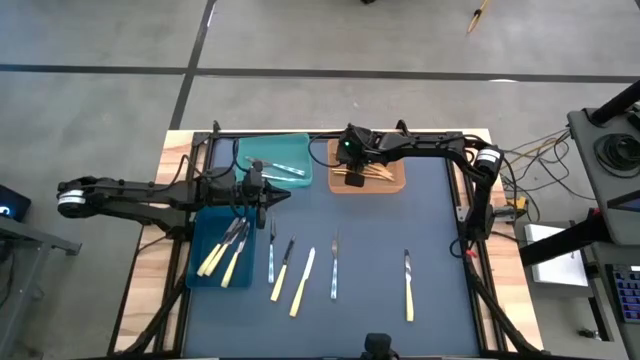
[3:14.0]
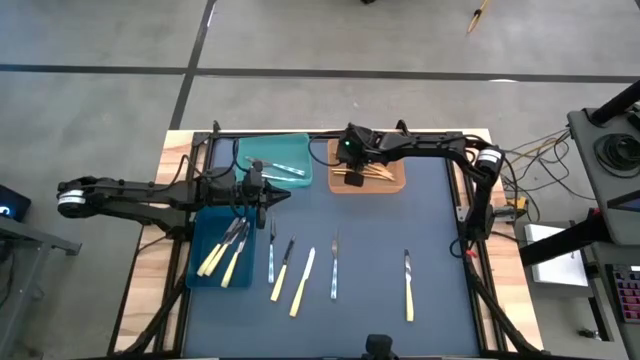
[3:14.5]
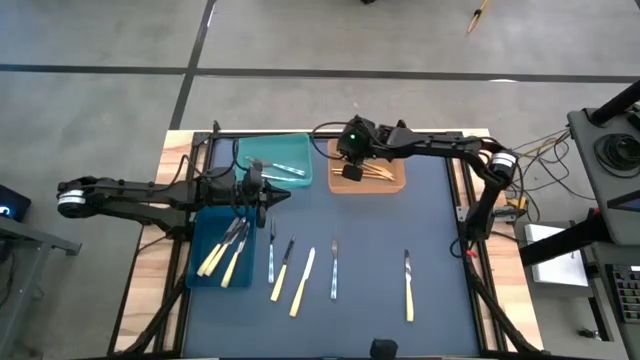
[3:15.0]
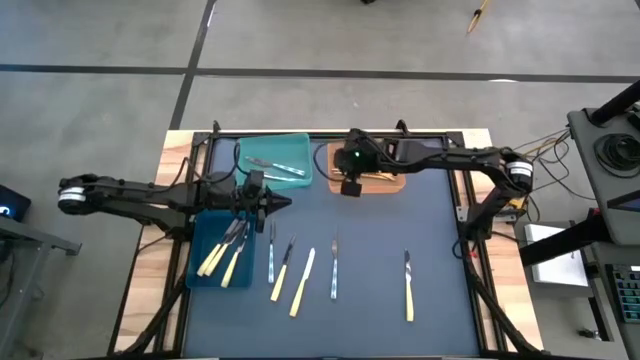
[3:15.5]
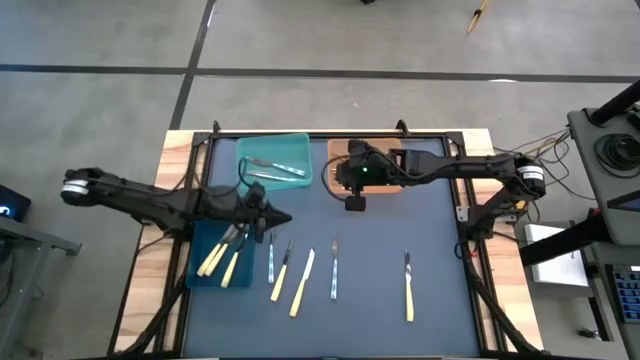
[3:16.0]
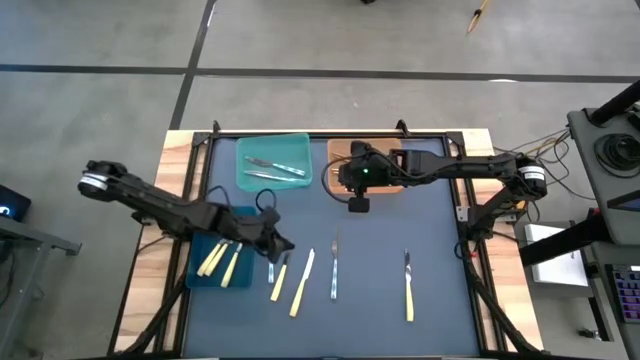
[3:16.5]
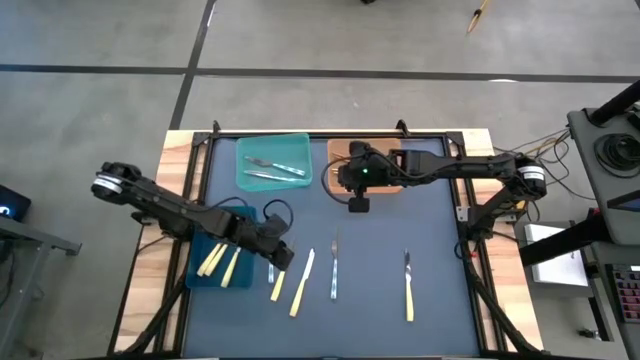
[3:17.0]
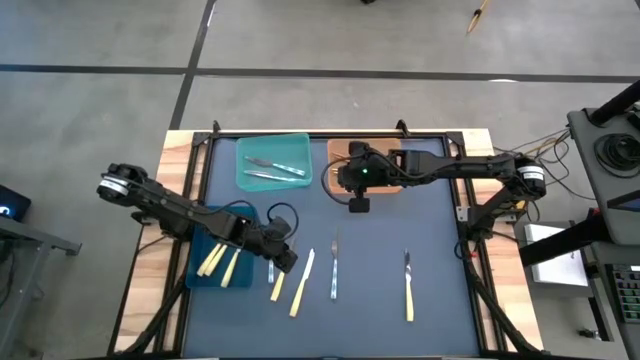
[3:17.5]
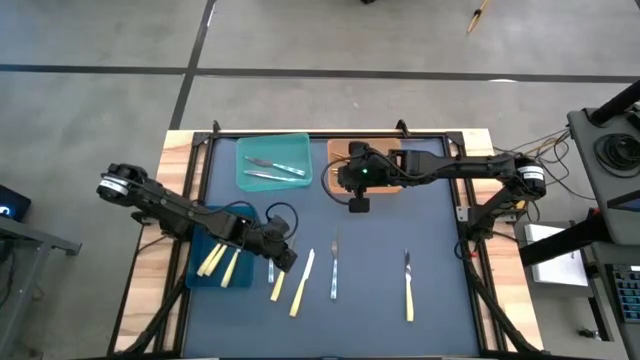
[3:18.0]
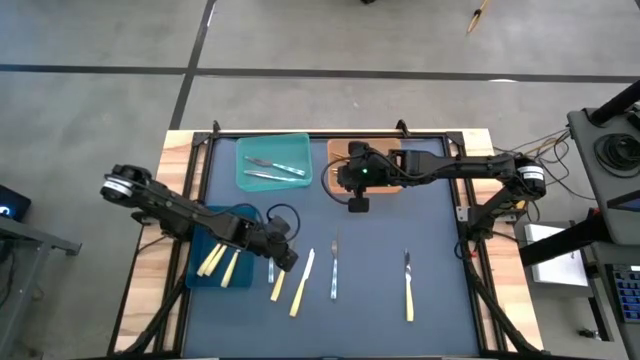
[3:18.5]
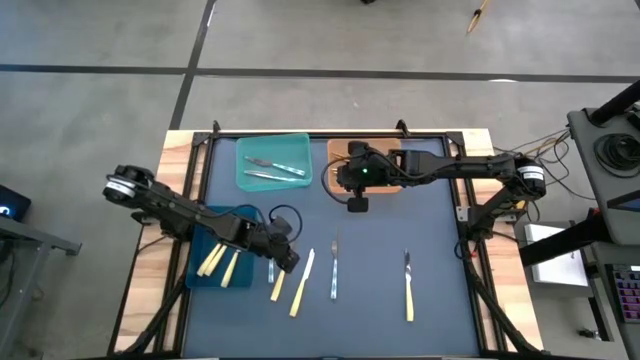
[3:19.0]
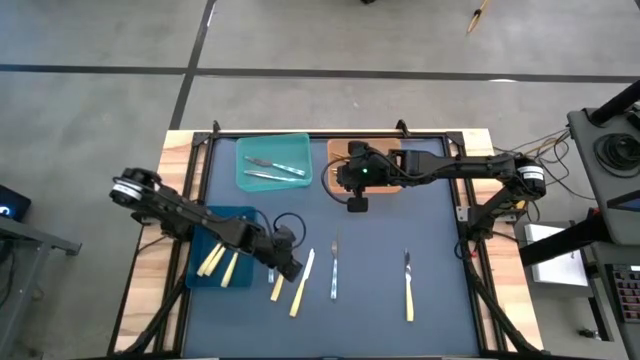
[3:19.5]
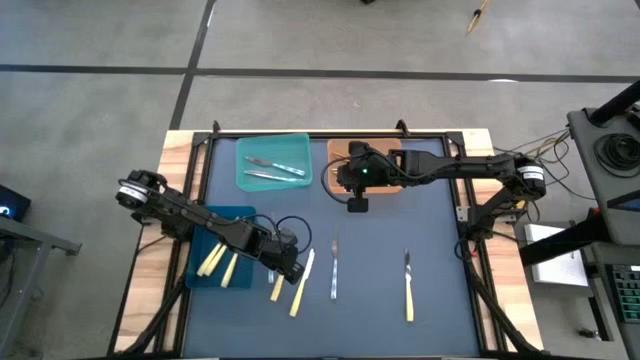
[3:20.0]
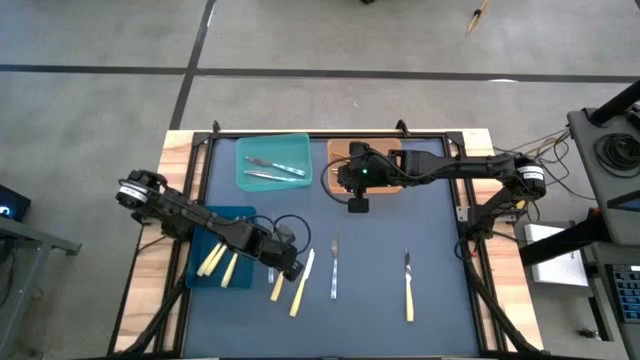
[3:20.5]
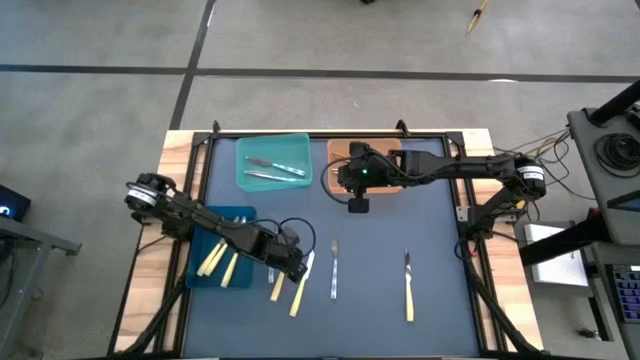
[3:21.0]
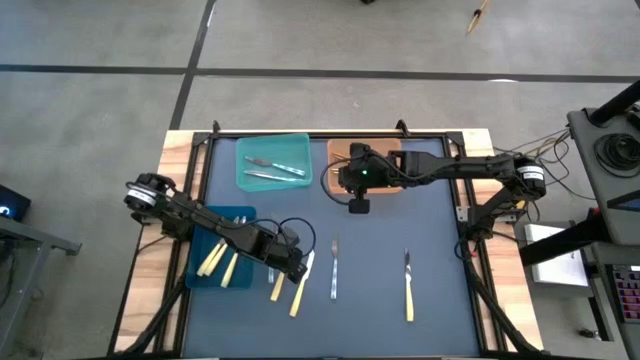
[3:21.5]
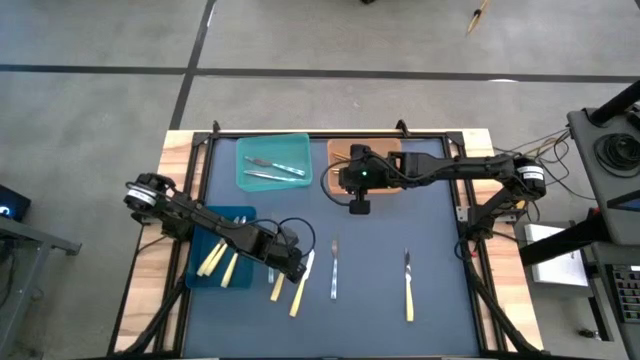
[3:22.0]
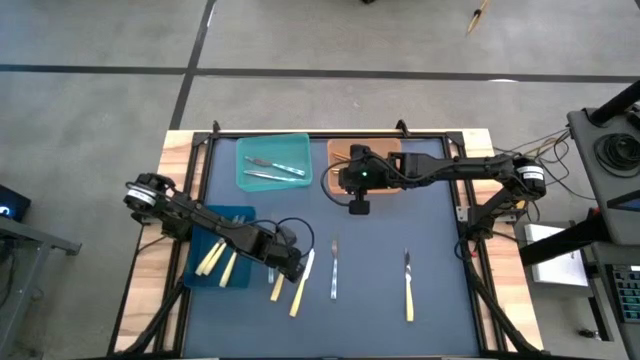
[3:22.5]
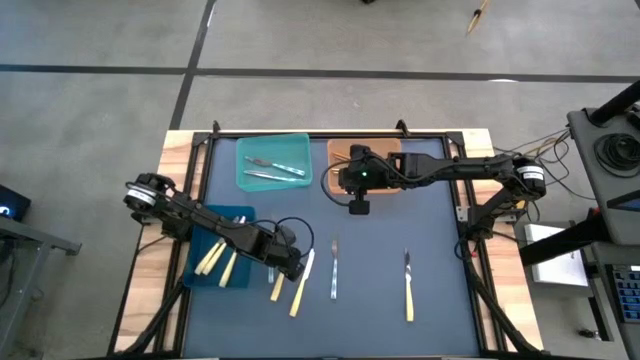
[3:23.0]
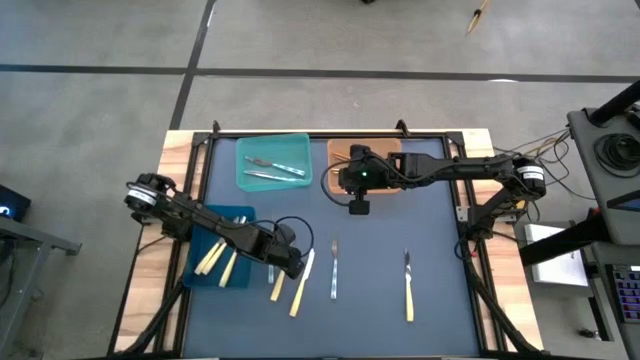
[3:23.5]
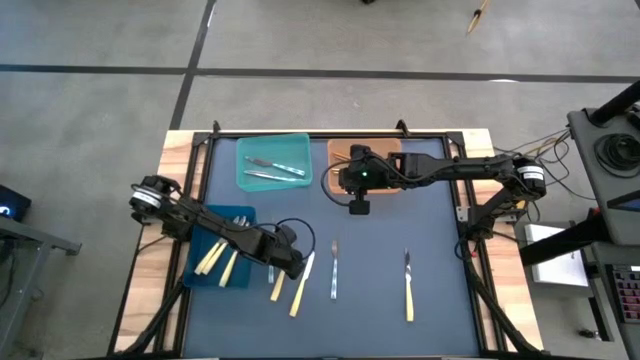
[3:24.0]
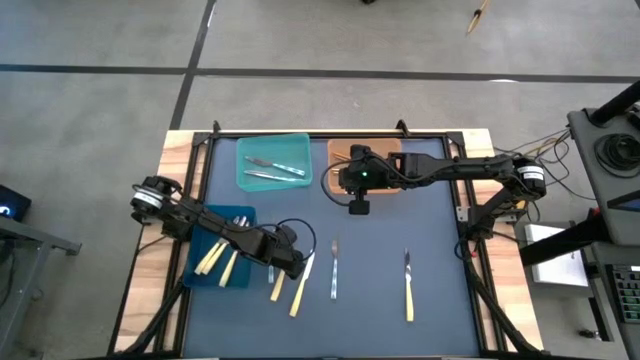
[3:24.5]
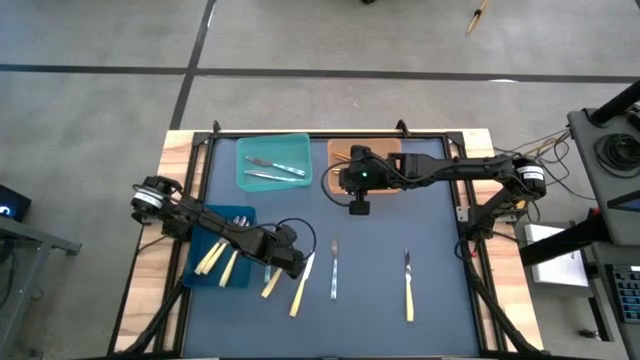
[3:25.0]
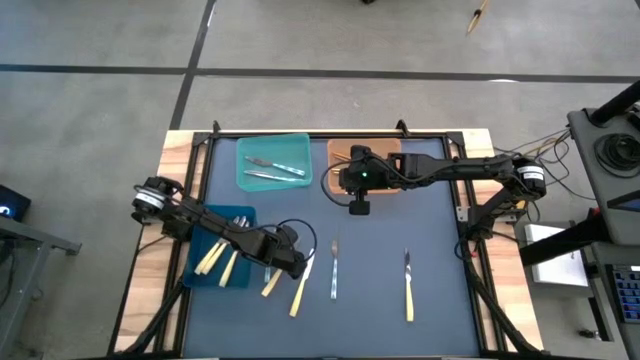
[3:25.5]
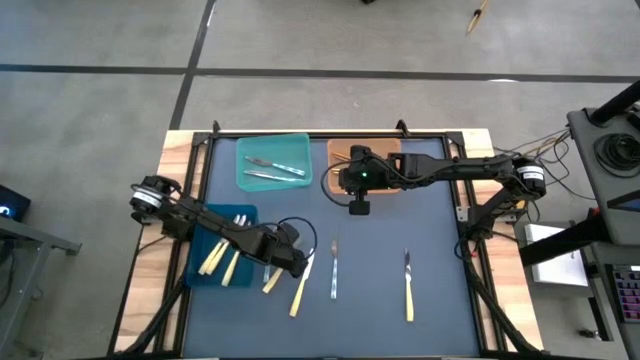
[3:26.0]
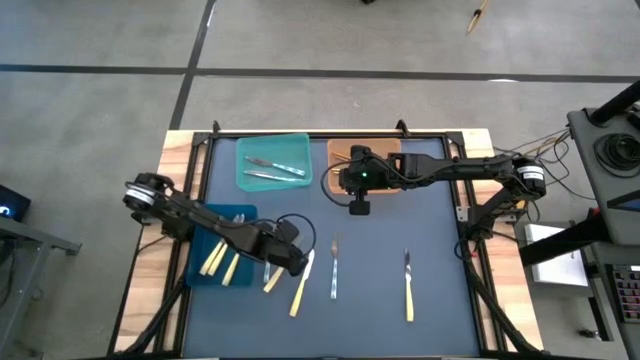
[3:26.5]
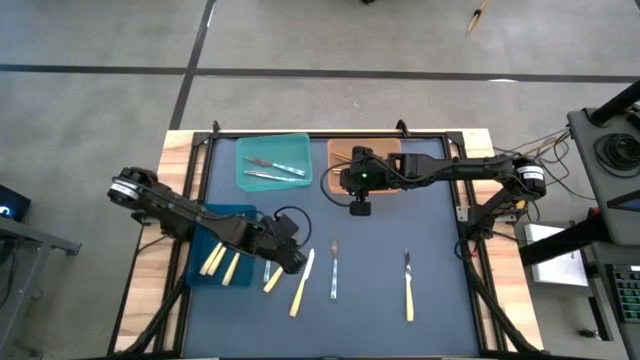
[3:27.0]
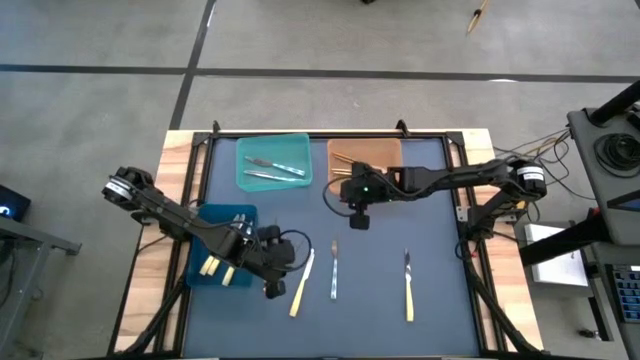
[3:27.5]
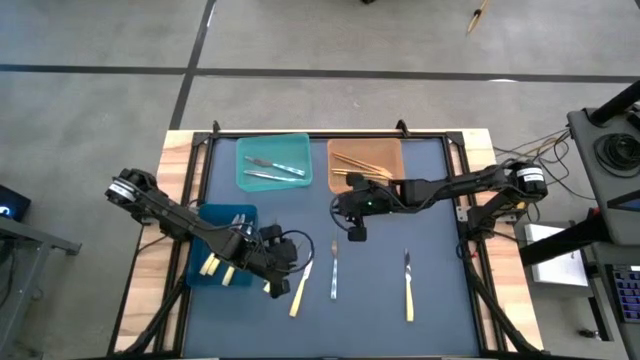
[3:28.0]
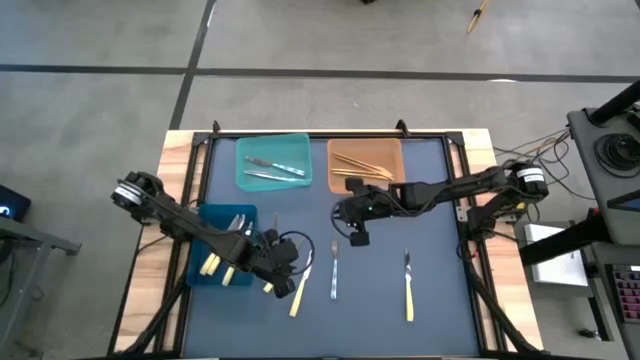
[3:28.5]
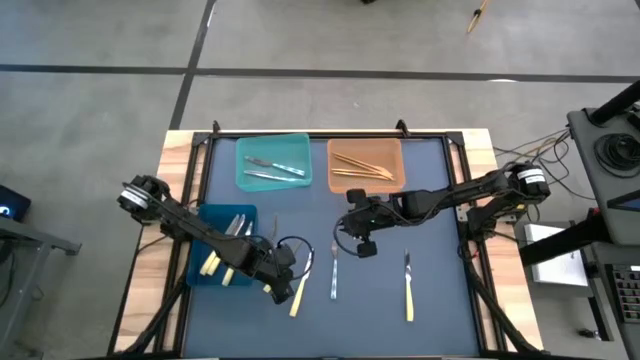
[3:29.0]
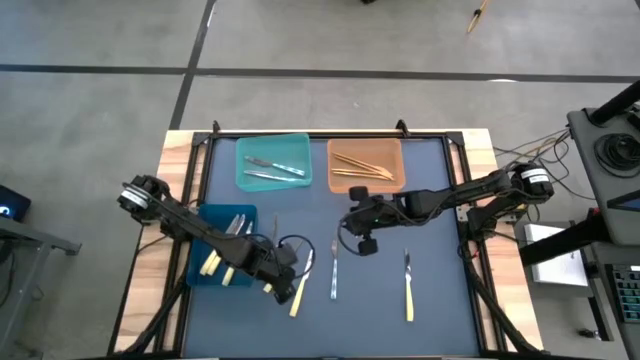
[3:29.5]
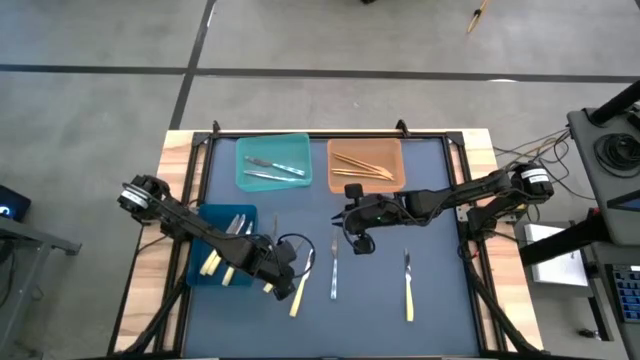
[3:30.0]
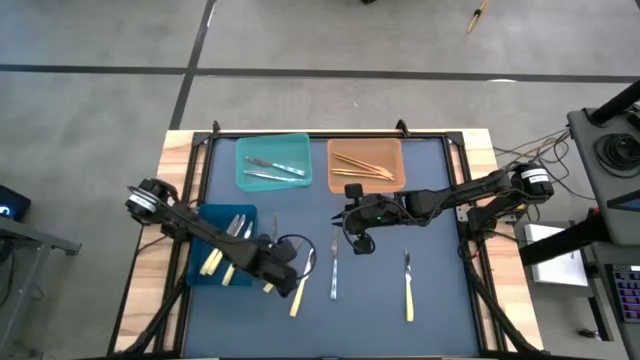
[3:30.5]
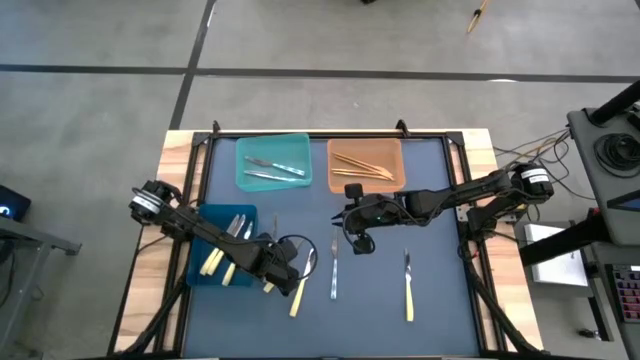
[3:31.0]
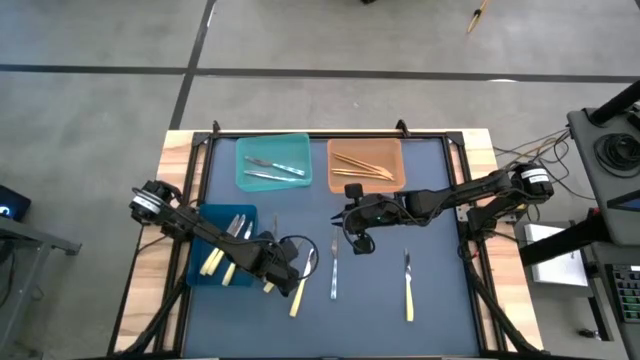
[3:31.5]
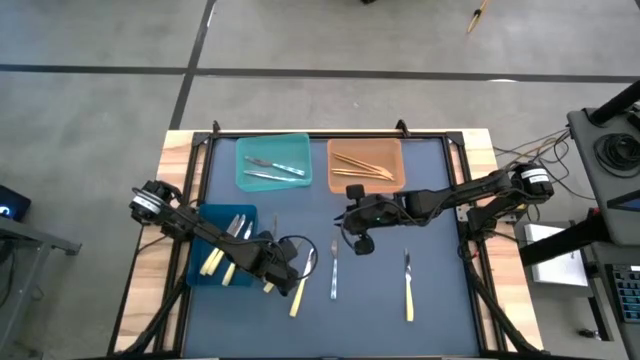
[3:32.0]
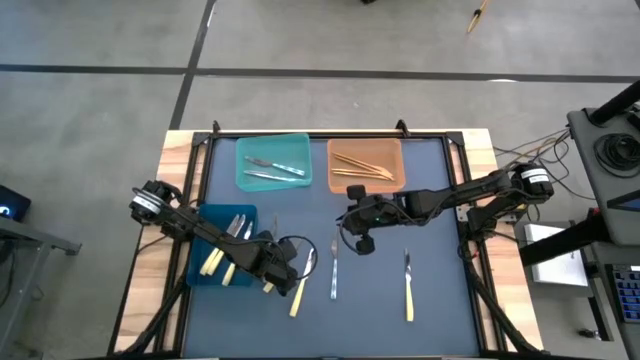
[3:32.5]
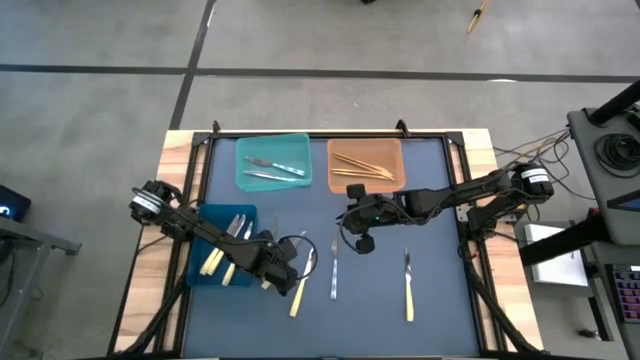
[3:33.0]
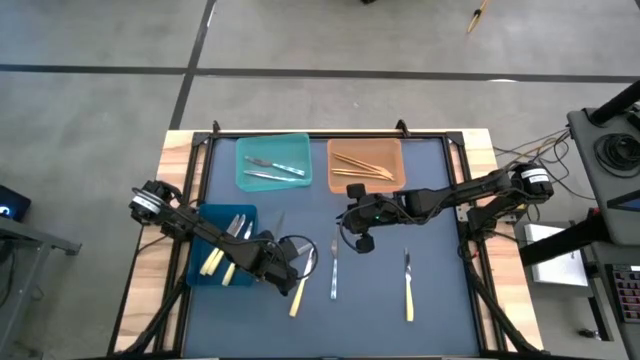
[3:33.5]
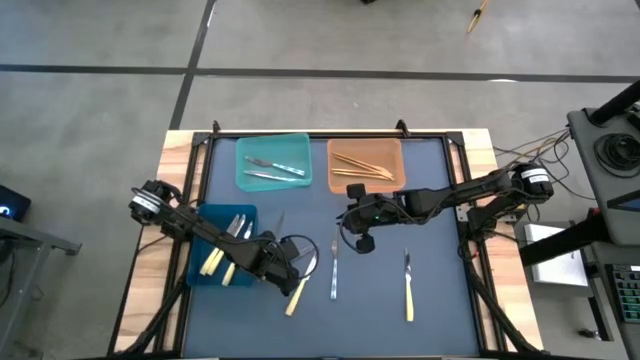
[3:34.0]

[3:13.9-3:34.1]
Task: Sort silverware by color (type)
Put the light yellow knife into the blue bin

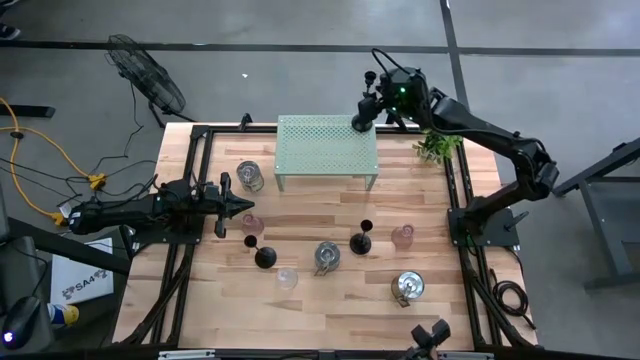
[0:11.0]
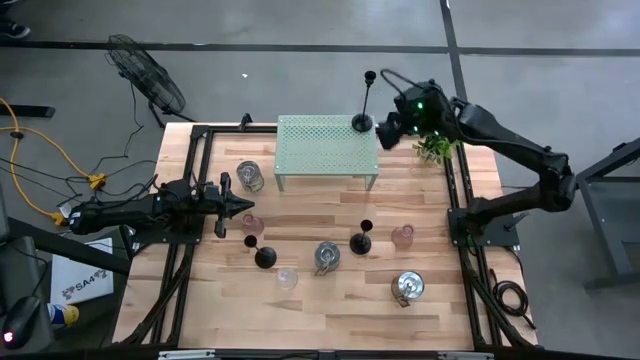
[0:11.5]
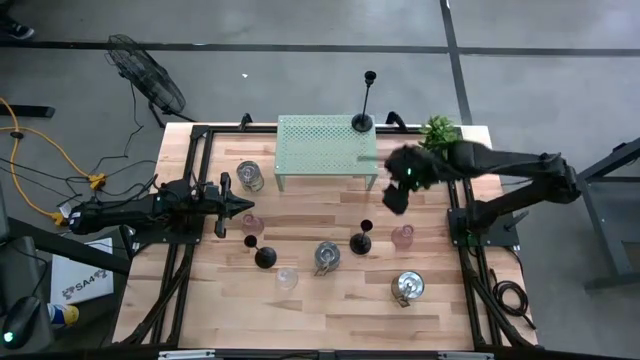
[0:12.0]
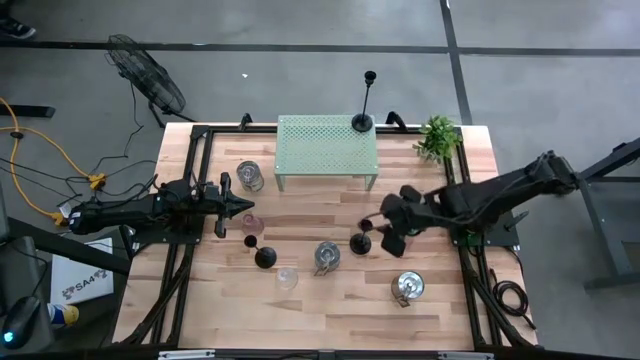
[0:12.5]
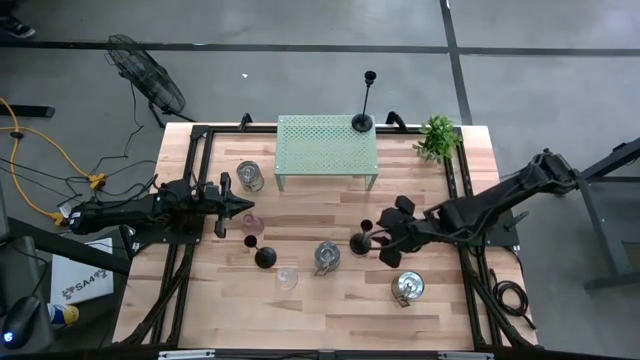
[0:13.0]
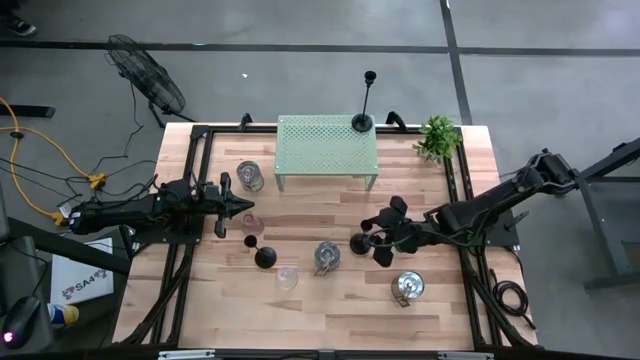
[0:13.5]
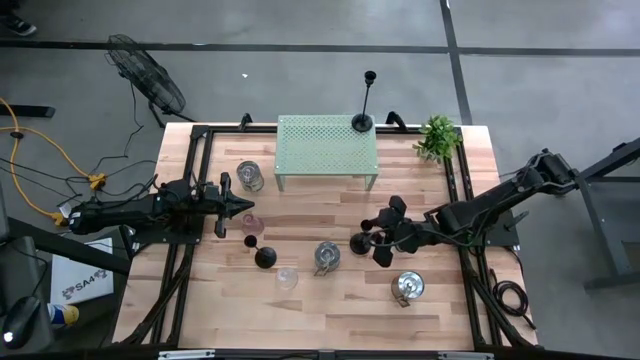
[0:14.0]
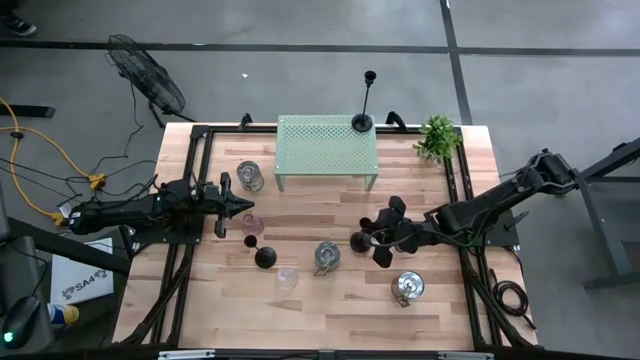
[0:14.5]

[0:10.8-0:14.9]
Task: Pick & Place candle stick holders
Put the right black candle holder on the shelf aligned with the black candle holder
